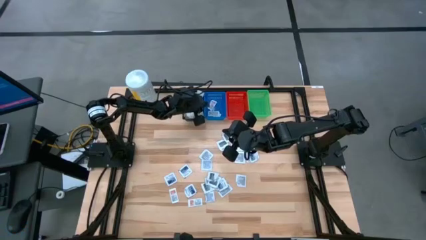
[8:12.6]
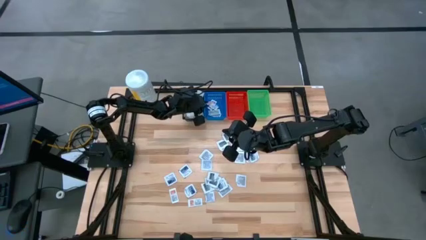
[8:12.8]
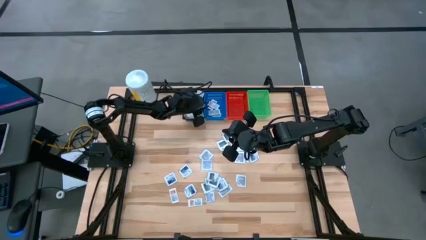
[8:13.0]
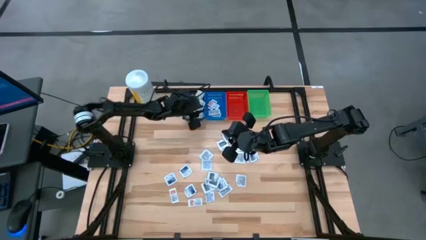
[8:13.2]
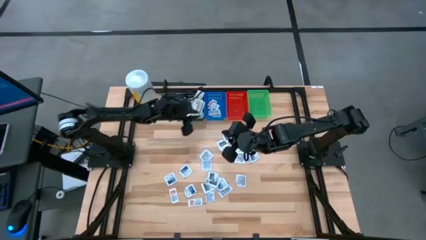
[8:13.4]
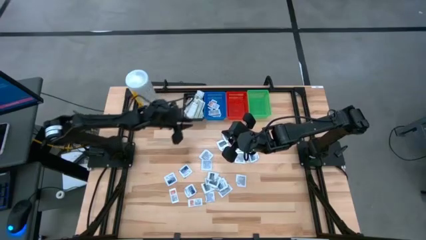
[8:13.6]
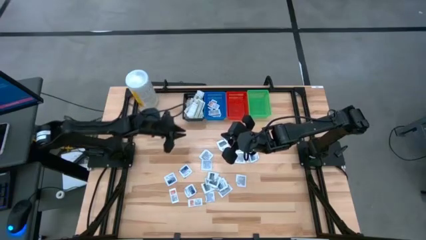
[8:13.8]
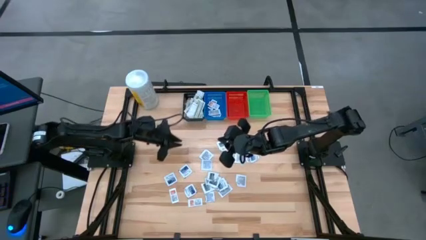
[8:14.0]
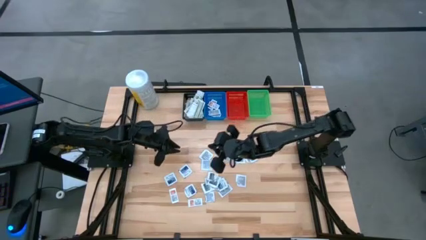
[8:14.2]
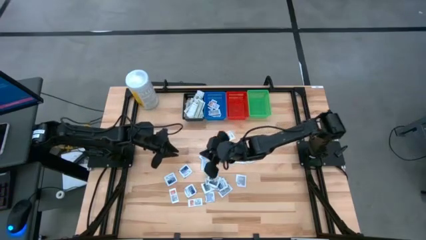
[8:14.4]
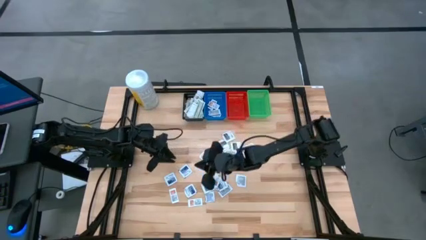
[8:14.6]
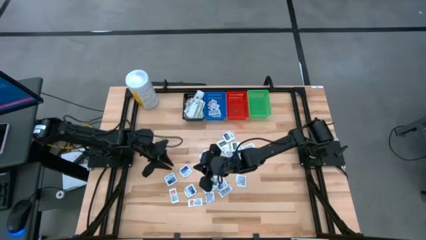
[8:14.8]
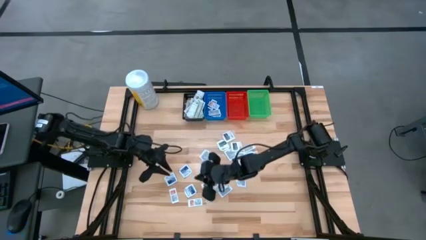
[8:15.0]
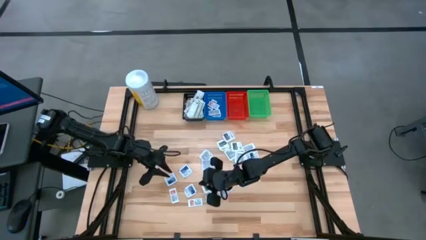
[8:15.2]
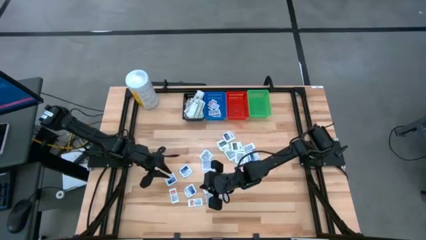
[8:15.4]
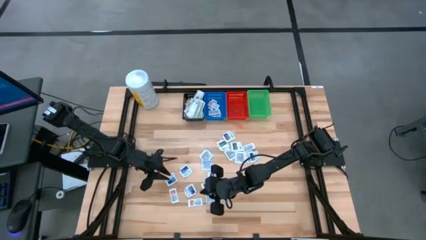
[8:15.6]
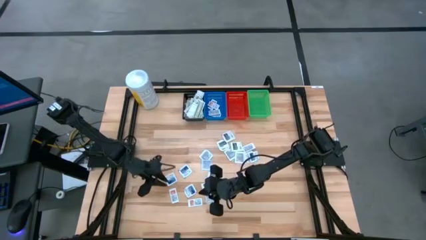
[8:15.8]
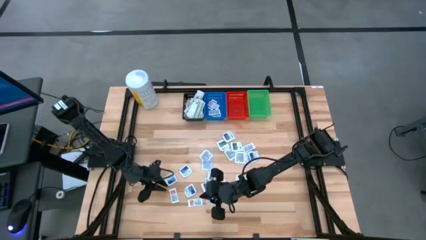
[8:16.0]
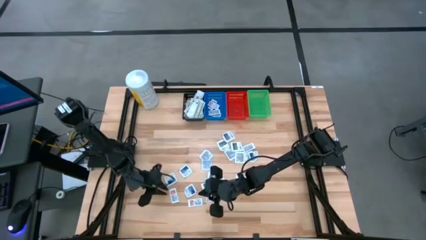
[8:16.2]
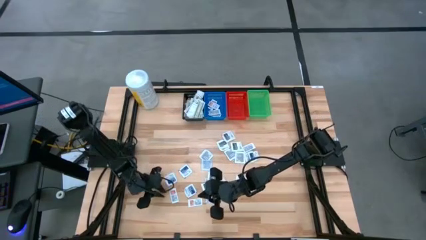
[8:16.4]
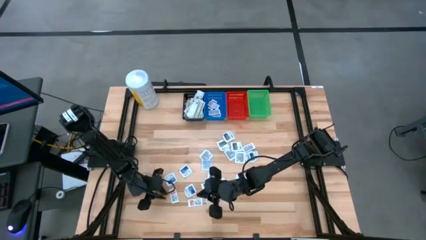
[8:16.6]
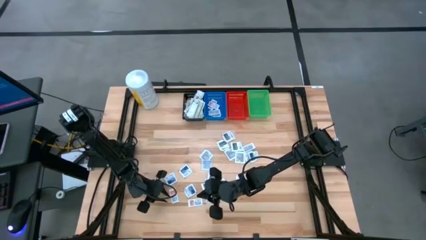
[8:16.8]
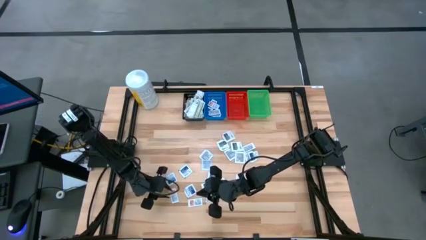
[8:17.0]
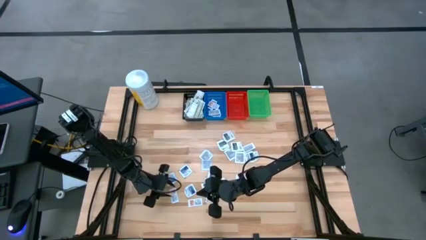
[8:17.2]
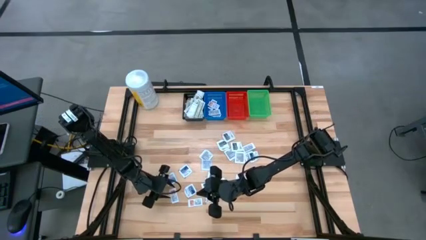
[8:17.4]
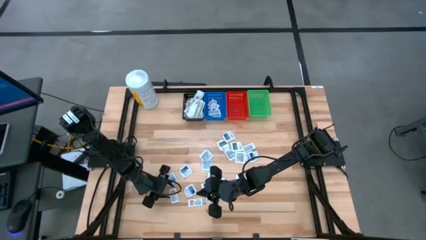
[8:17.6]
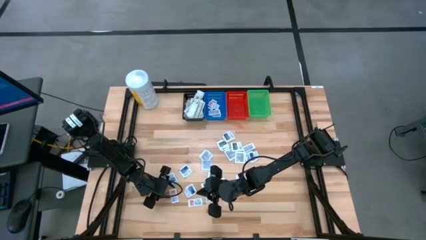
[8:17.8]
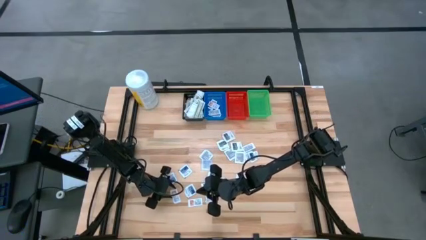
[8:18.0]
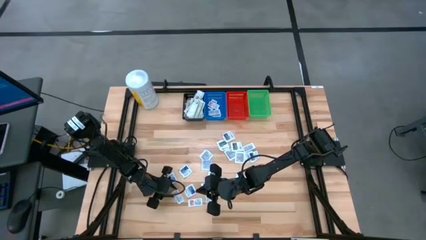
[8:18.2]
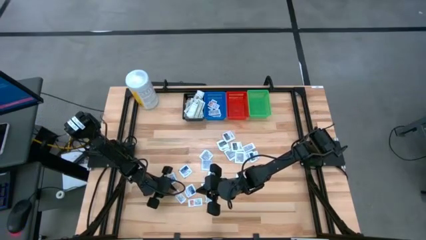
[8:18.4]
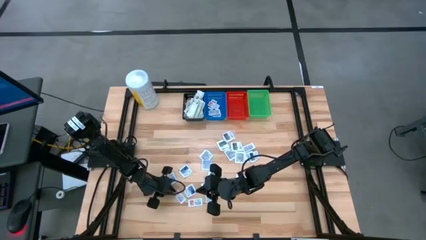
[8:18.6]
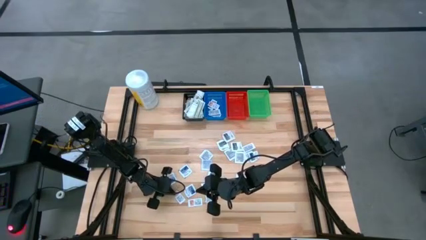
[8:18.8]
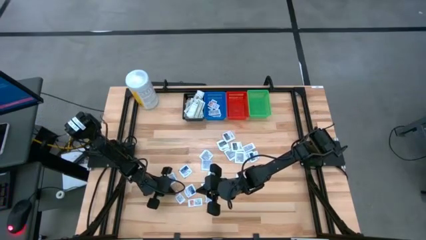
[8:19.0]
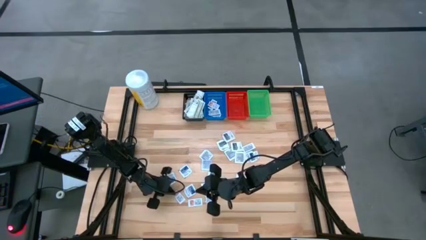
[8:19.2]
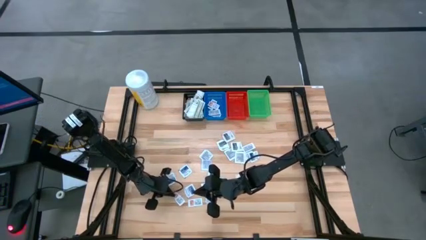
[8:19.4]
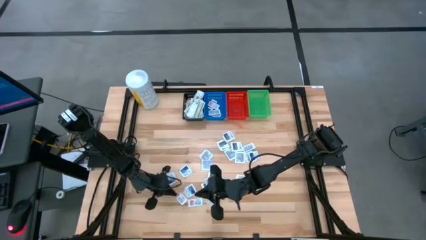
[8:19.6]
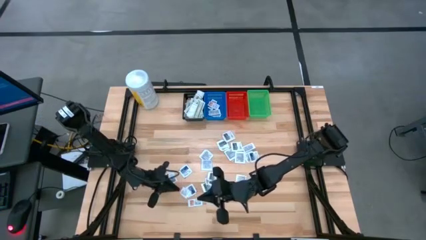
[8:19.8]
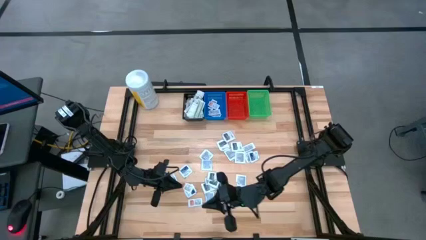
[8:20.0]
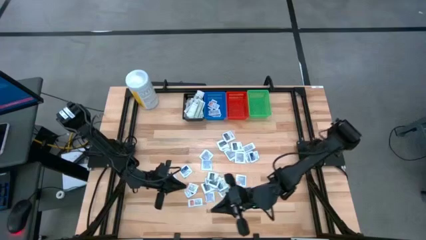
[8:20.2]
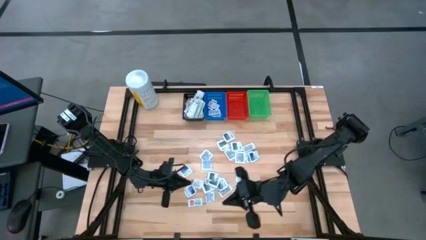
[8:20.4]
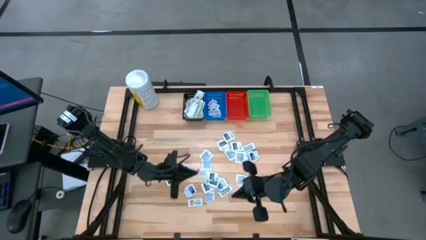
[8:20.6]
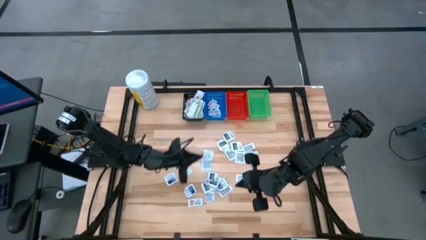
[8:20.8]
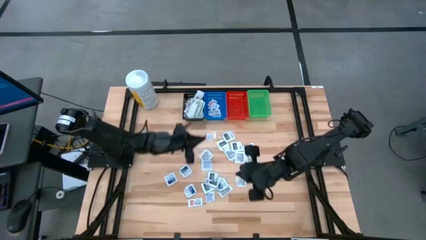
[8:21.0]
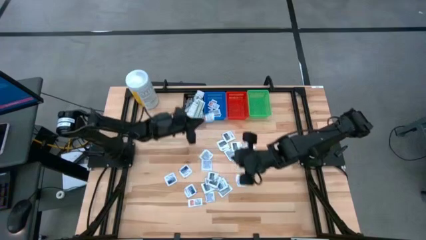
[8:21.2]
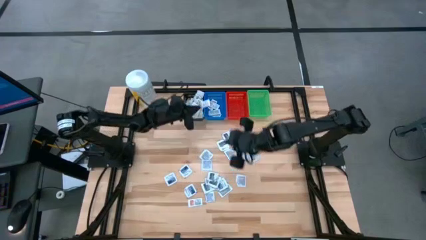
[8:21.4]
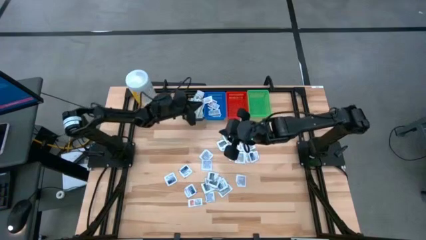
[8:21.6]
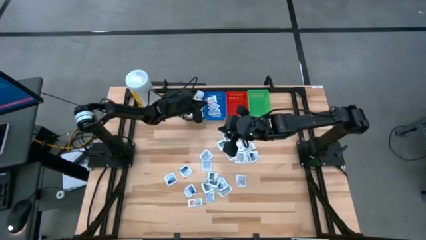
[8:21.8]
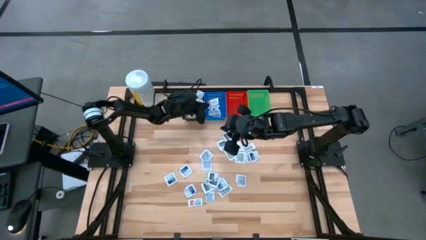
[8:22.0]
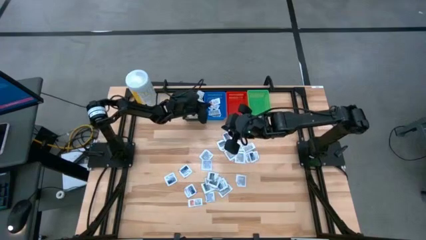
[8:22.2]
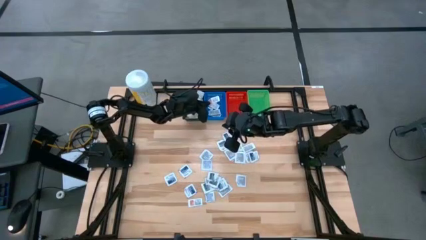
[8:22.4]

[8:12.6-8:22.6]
Task: Pick & Place First Aid Supplies
Put the orange ointment pack in the blue bin

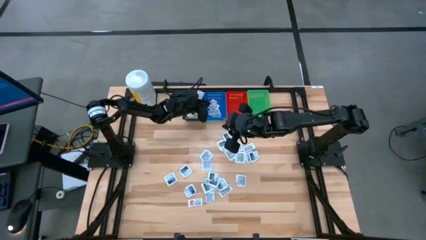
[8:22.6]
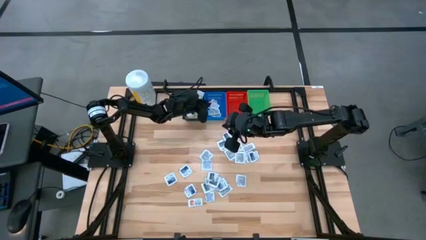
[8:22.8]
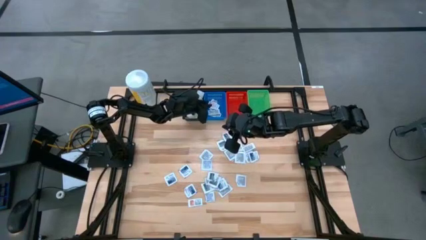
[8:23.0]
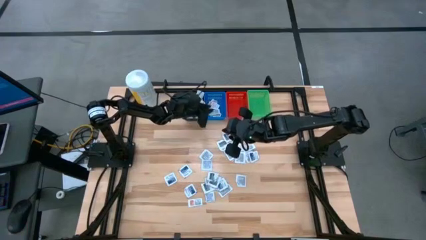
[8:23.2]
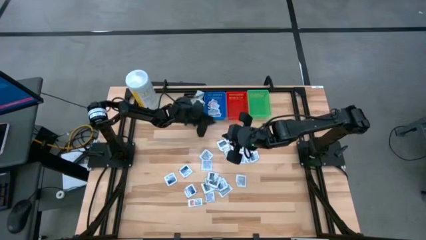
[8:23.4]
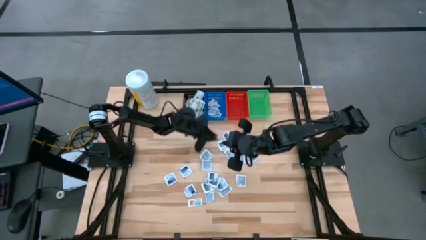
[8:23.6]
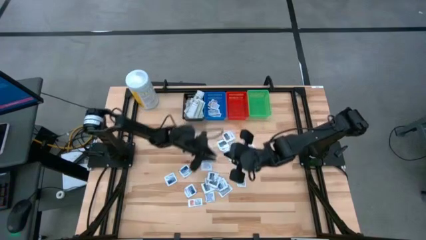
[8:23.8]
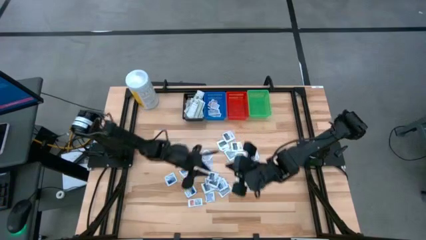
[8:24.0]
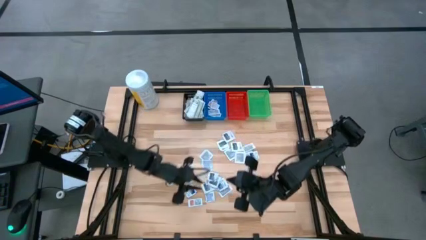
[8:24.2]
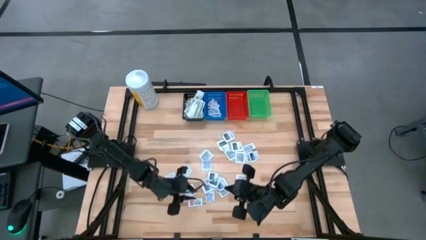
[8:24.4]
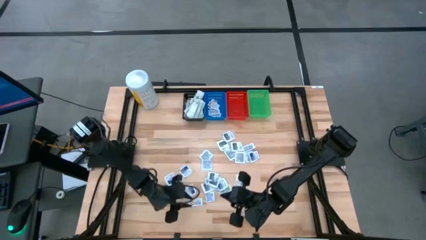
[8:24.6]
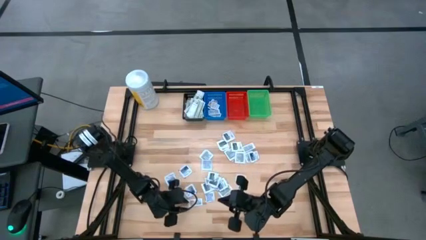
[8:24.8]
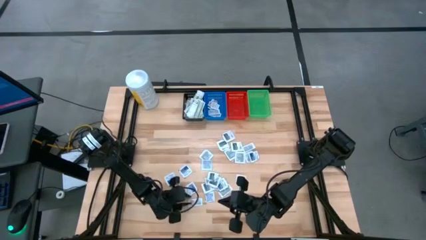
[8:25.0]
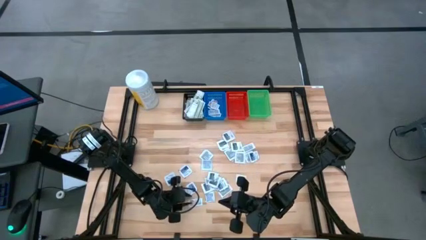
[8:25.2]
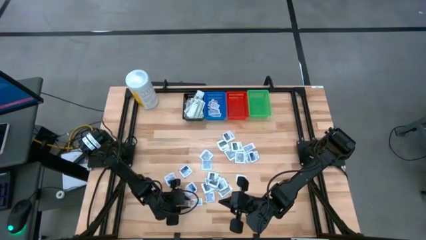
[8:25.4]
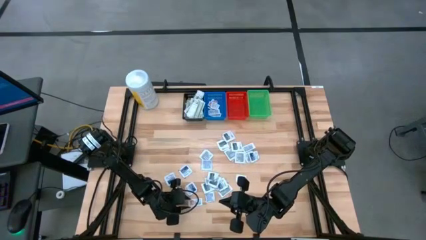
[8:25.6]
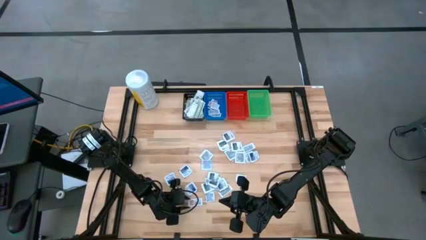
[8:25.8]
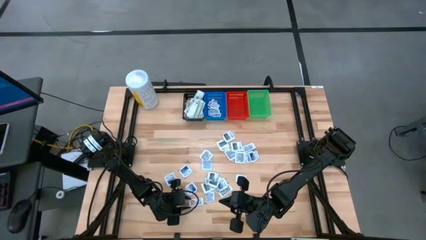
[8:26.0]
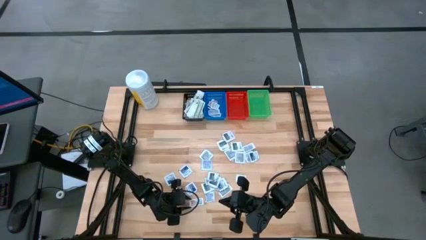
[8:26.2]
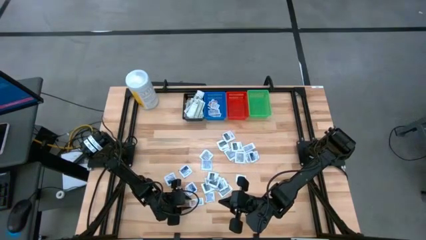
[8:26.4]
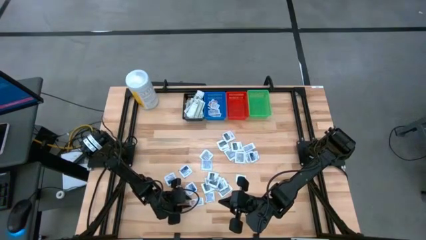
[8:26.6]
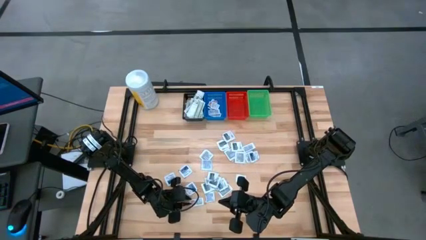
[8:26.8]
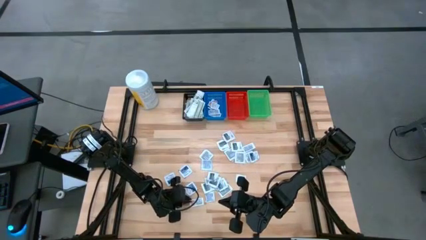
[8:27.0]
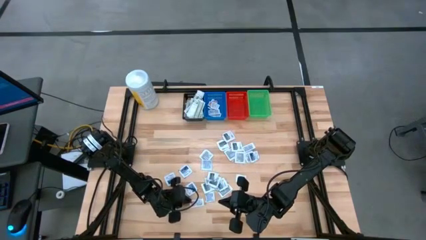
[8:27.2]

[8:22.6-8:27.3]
Put the orange ointment pack in the blue bin
